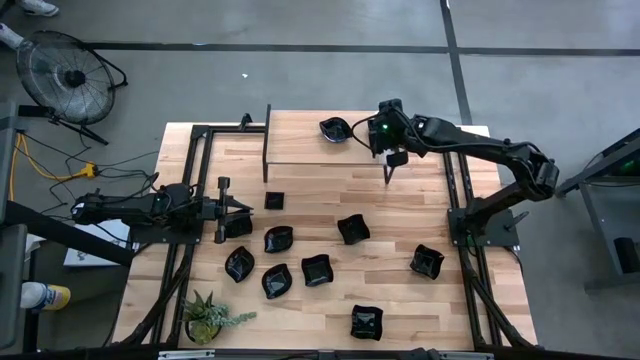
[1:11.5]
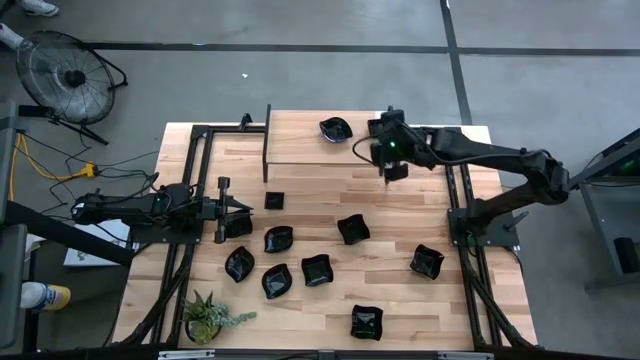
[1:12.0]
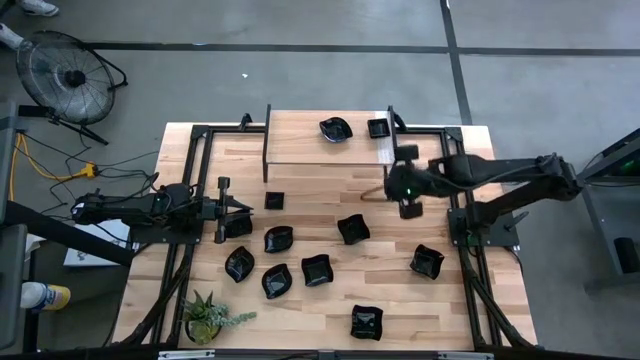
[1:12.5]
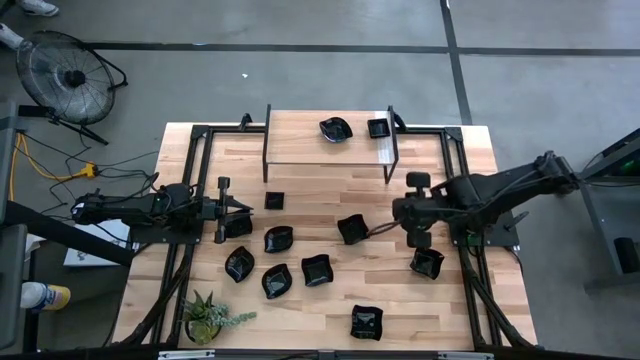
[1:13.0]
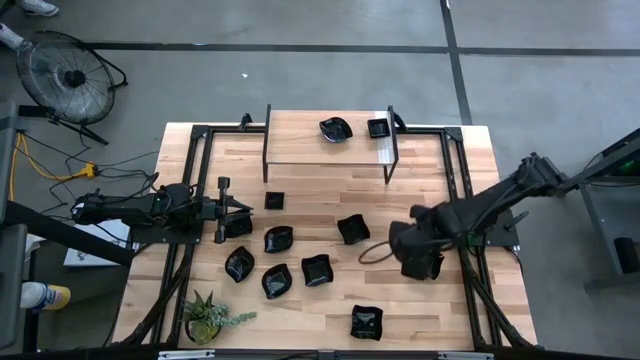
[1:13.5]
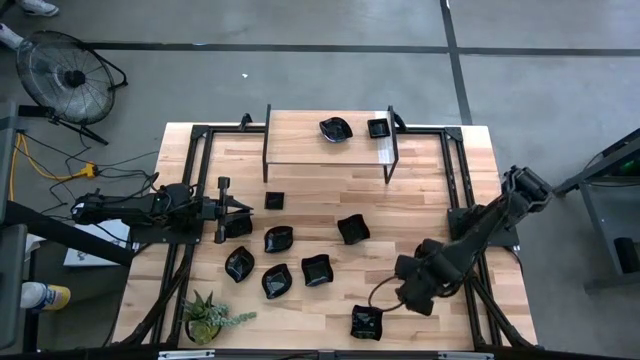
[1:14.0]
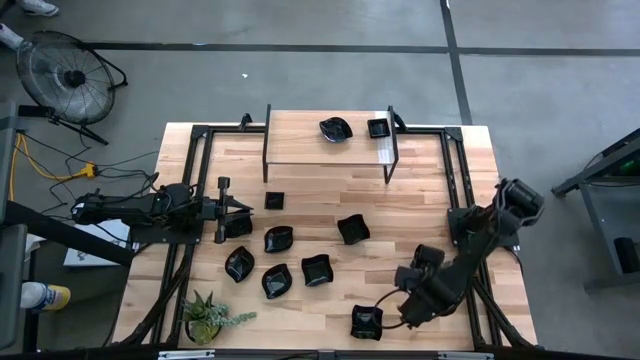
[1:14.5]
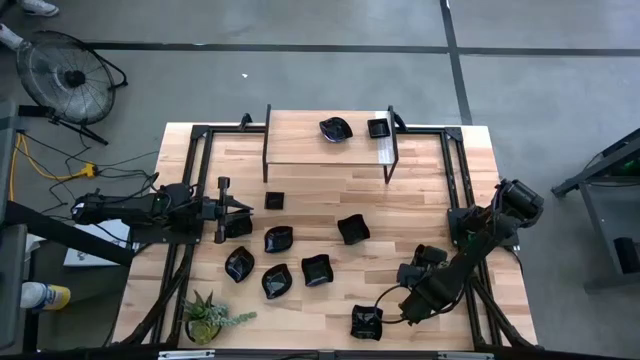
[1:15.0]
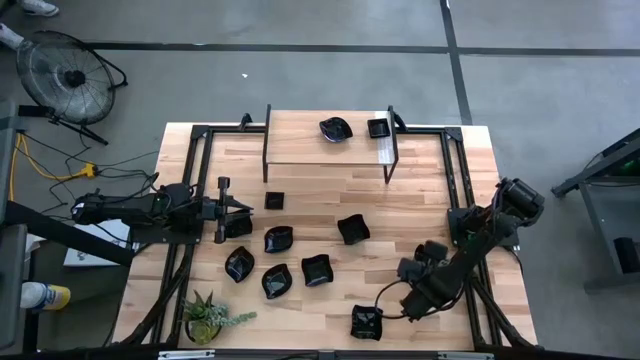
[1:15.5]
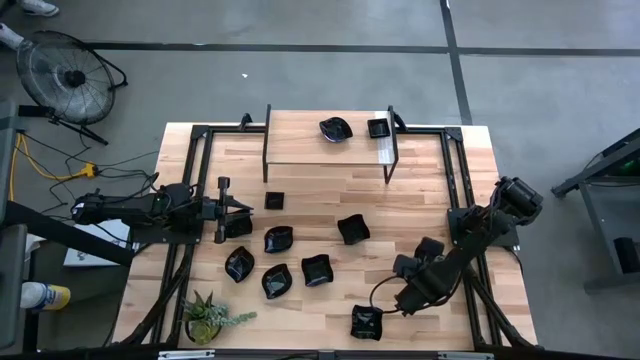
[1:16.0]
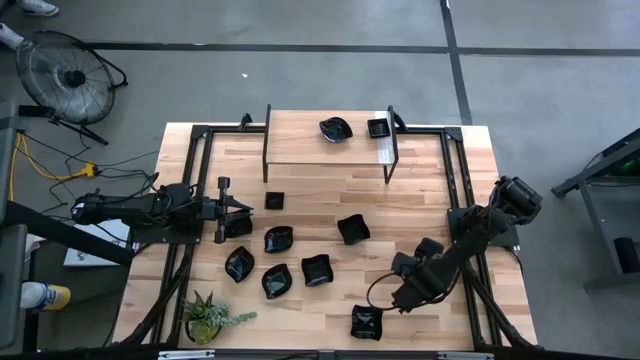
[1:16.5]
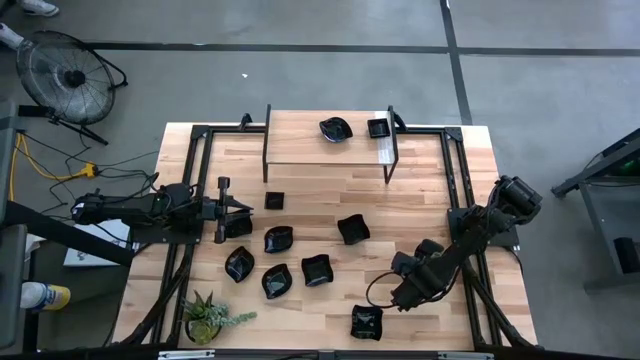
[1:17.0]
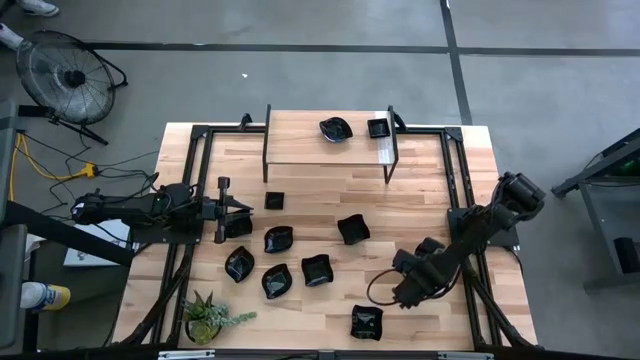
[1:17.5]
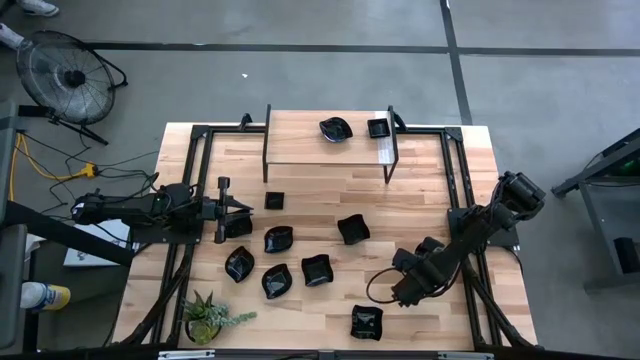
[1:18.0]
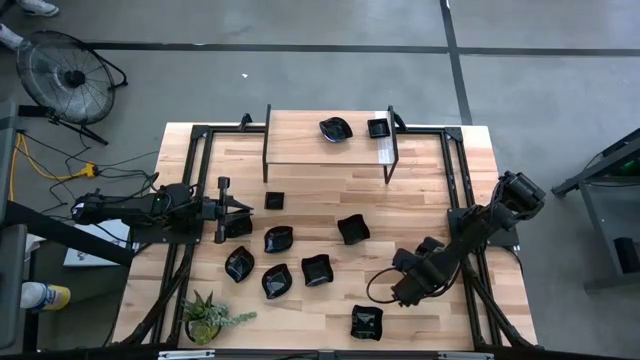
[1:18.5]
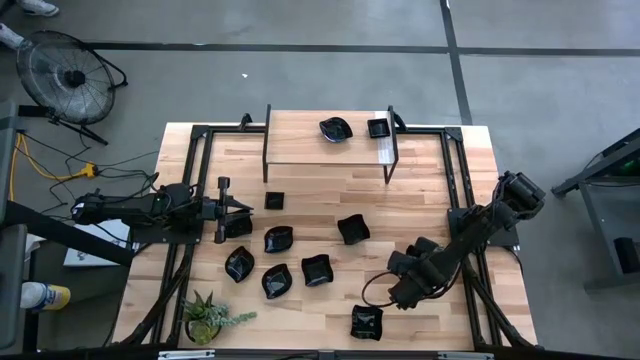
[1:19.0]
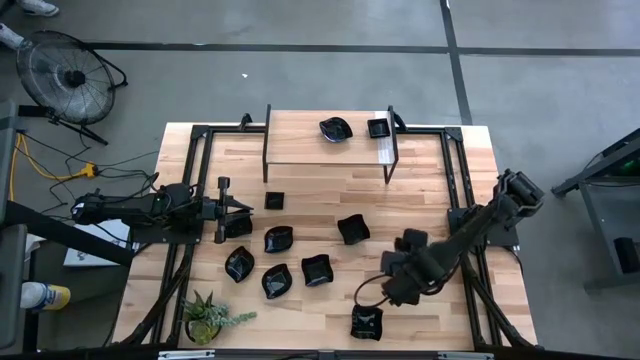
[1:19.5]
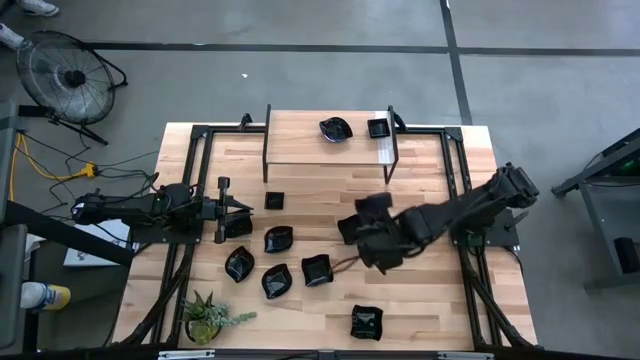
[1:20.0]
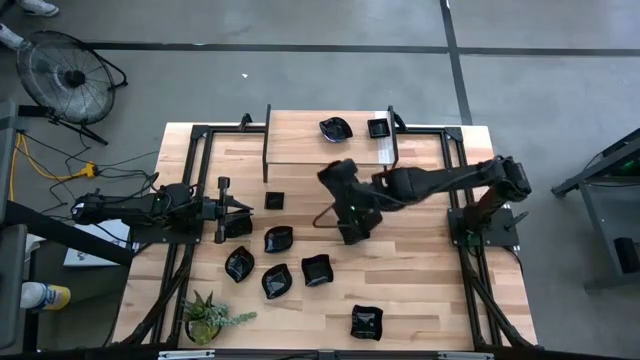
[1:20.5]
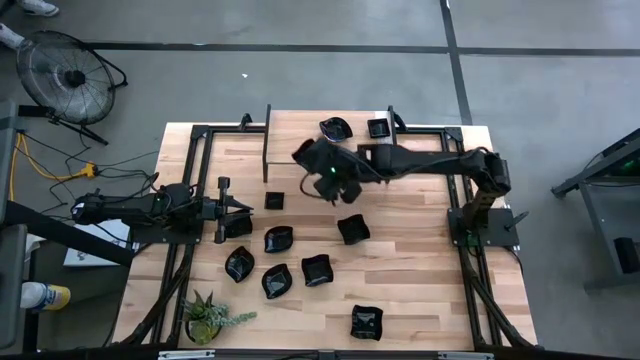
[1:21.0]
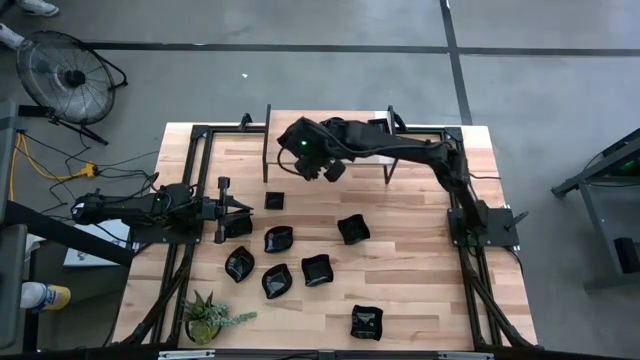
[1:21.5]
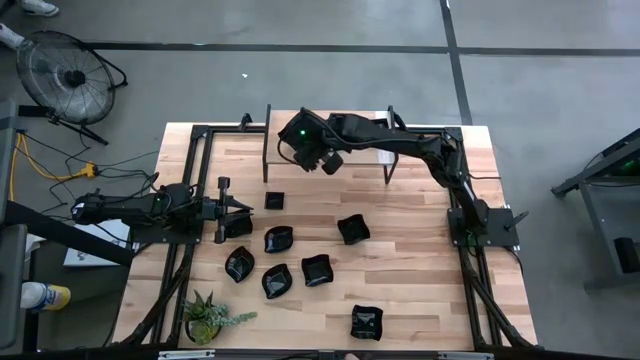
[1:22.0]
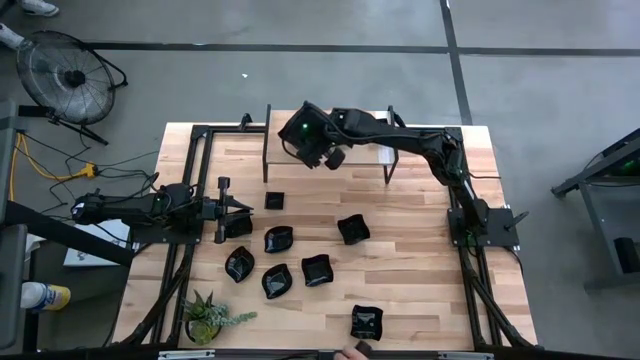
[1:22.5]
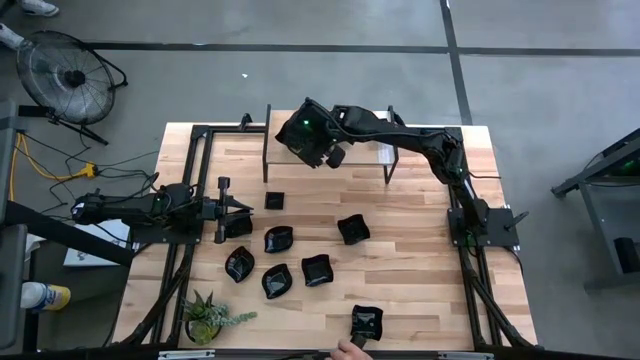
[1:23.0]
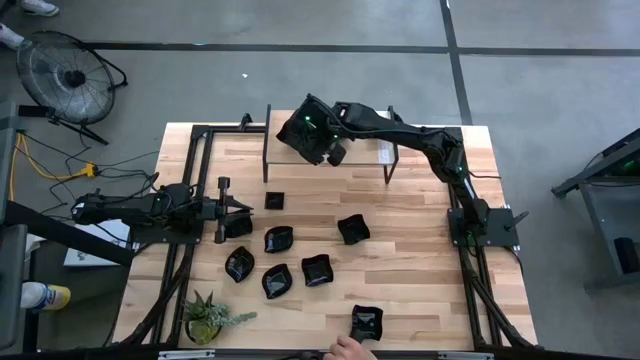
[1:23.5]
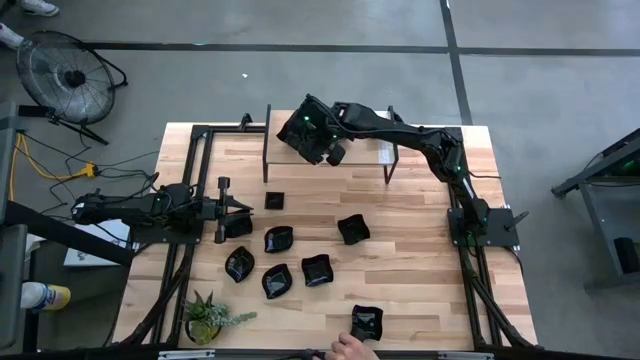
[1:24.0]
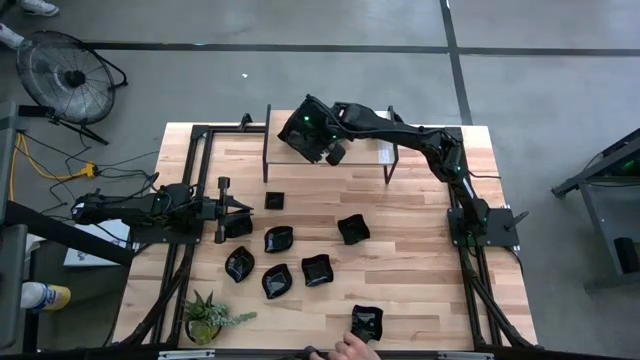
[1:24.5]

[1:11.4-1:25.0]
Task: Pick & Place Mini shaped plates
Put the black distorted square plate on the shelf

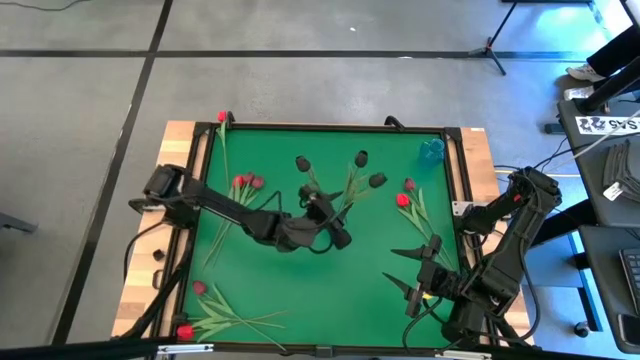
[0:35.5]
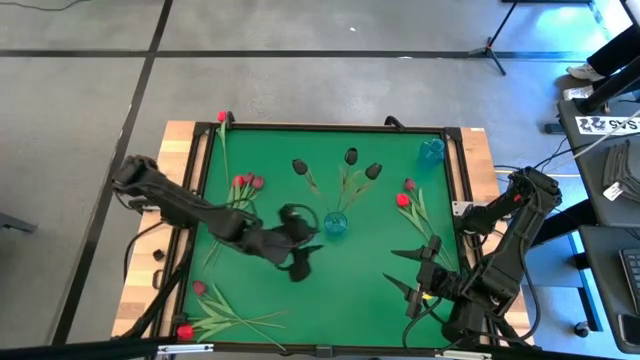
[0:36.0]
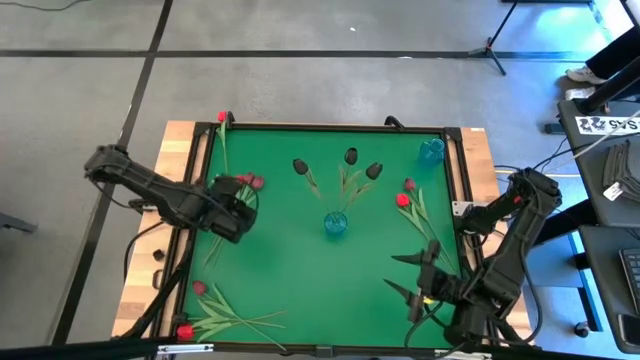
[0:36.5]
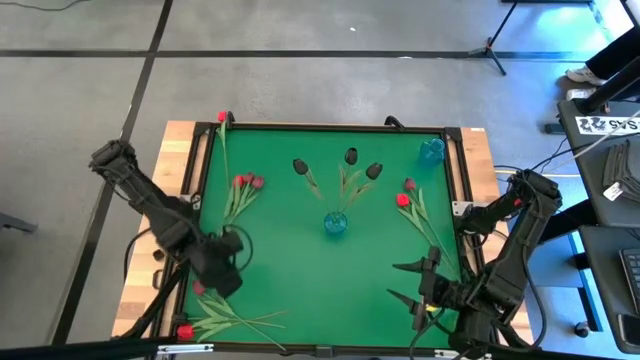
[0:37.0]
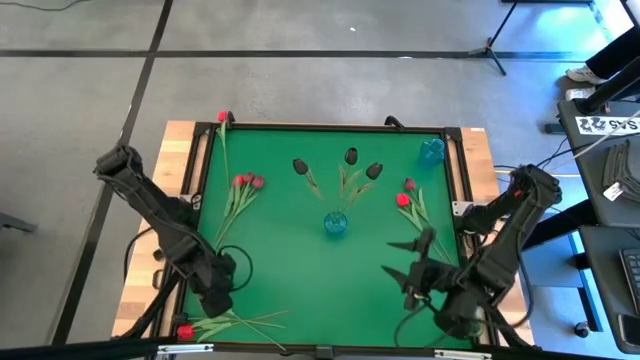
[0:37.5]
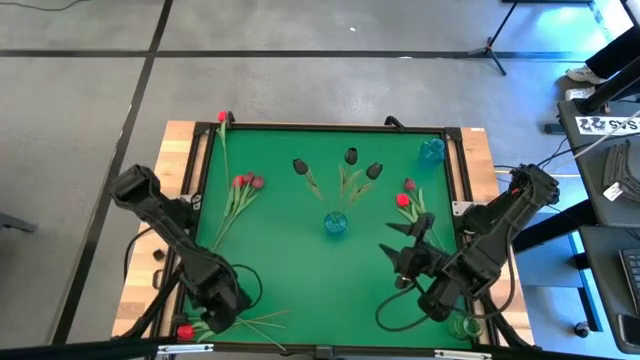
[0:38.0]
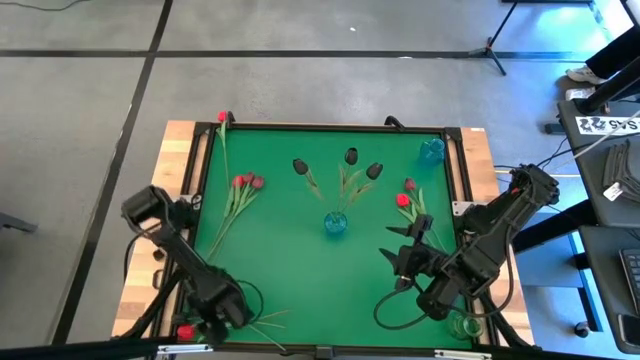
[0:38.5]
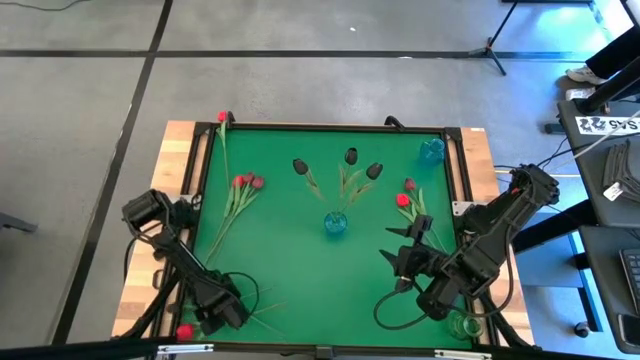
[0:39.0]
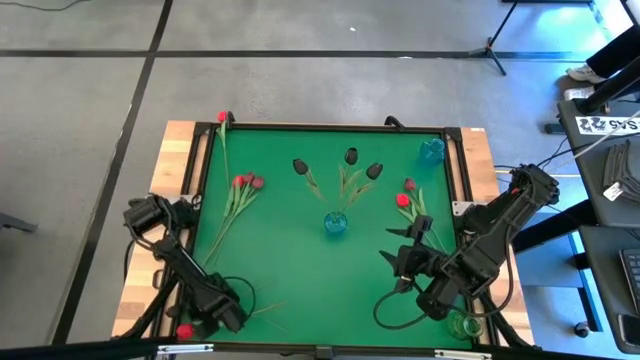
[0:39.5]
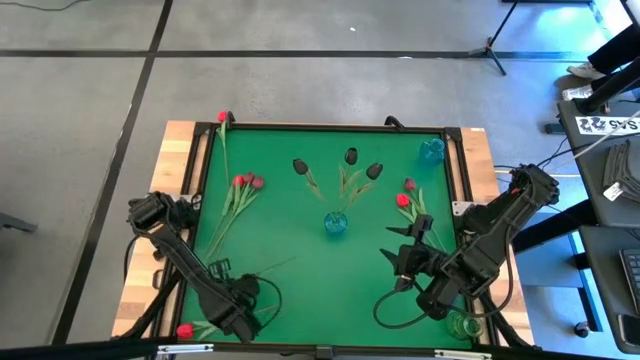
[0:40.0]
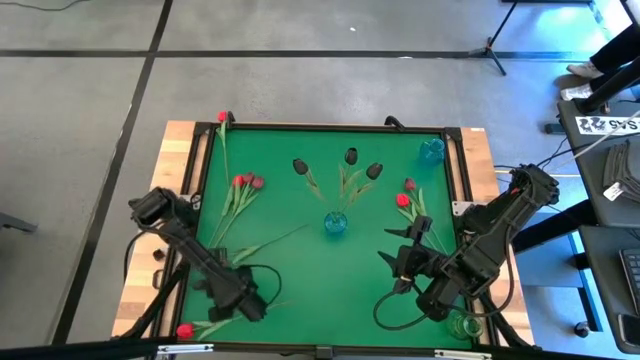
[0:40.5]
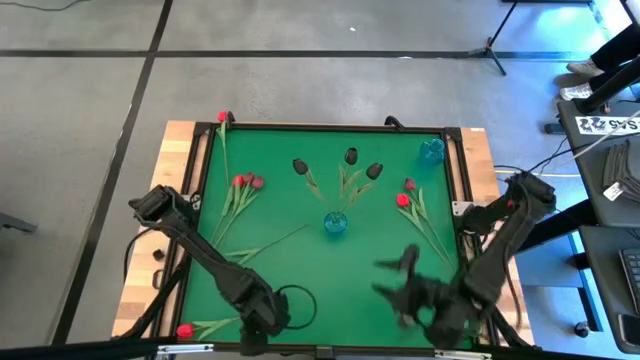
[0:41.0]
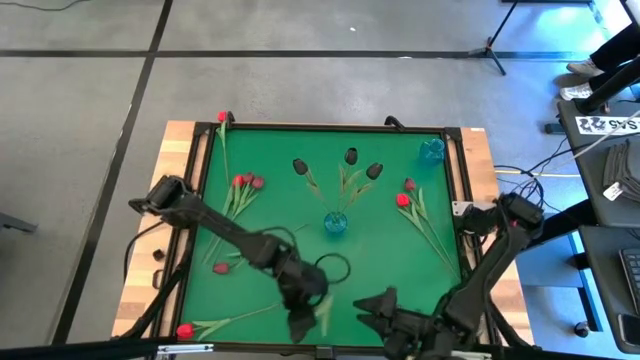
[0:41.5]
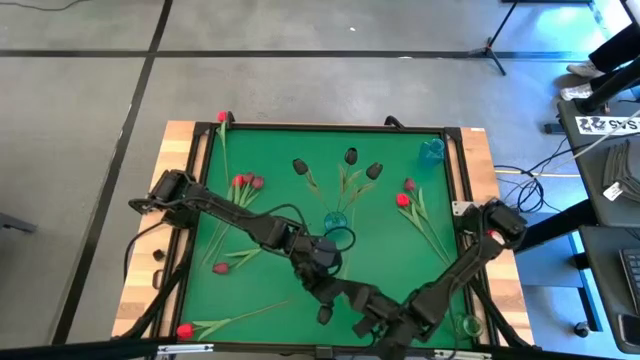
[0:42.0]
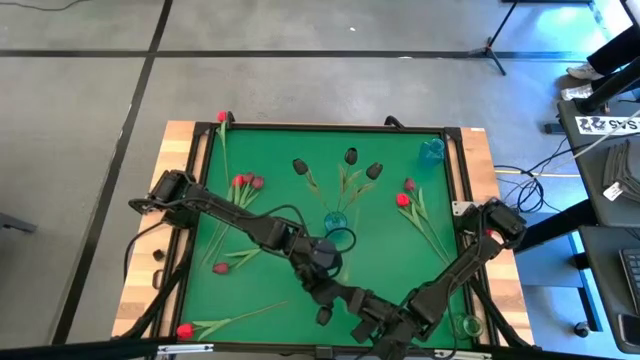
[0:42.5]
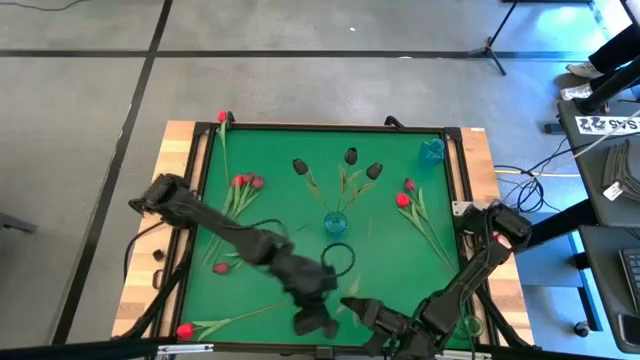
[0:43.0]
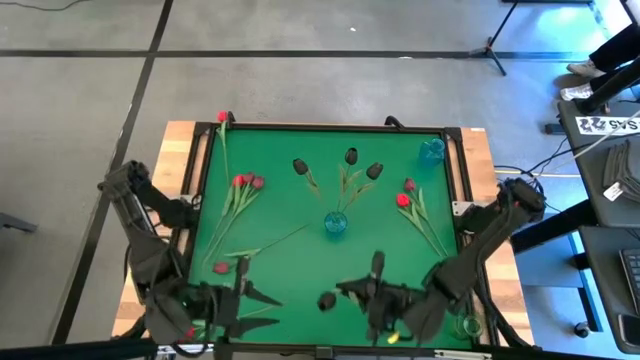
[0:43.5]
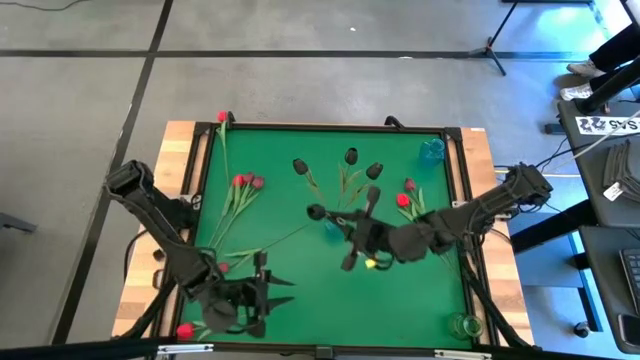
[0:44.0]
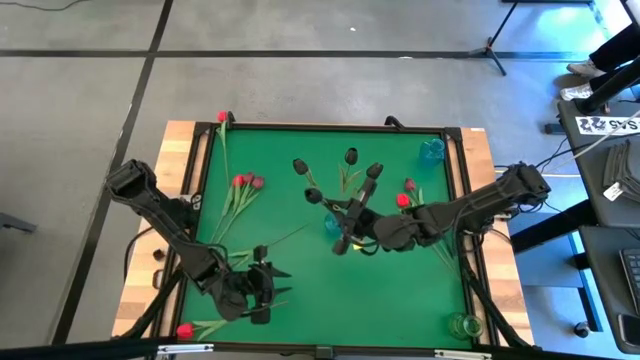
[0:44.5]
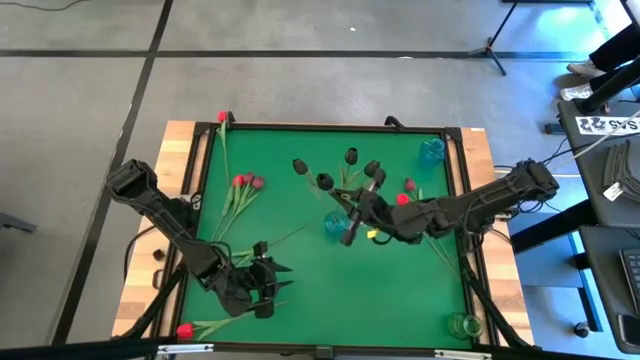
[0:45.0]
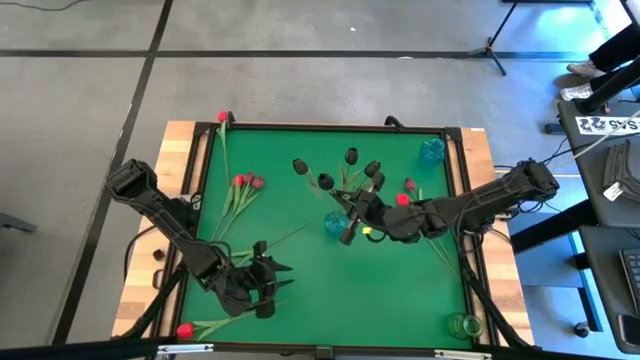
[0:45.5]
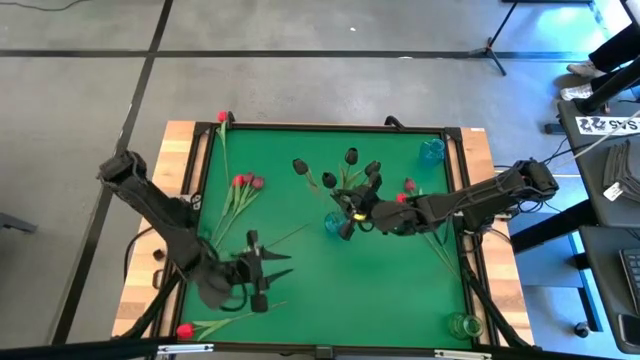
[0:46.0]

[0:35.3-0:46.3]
Task: Sort flowers into vase by color
Put the black tulip into the bottom blue vase
